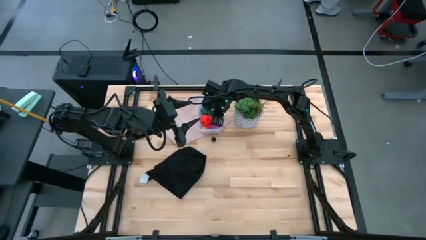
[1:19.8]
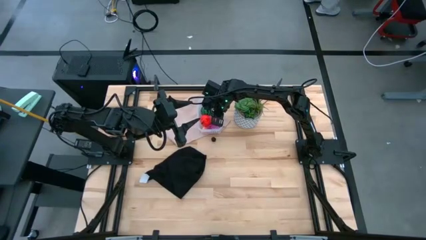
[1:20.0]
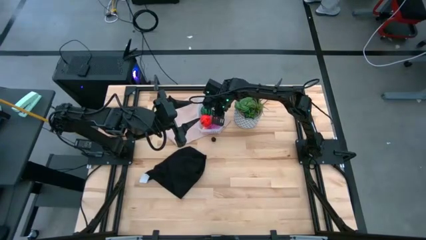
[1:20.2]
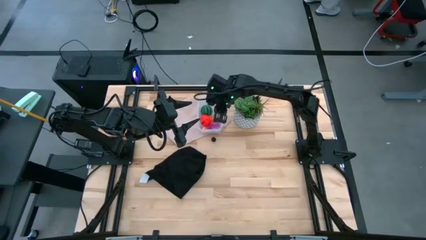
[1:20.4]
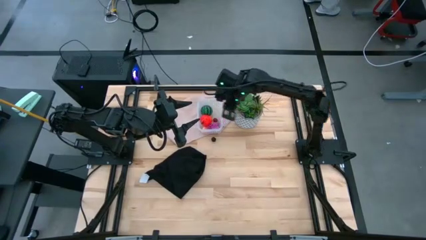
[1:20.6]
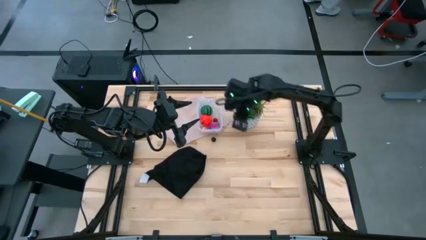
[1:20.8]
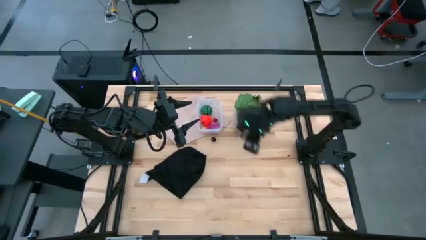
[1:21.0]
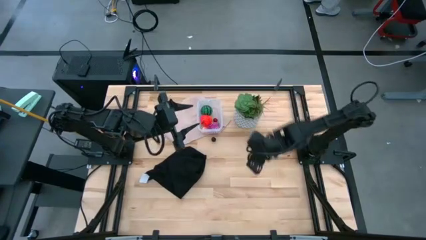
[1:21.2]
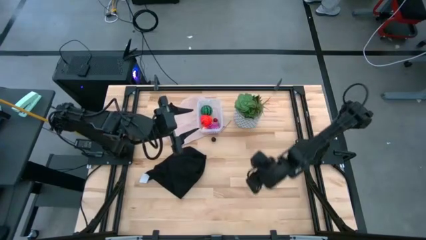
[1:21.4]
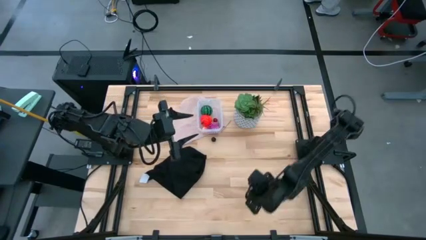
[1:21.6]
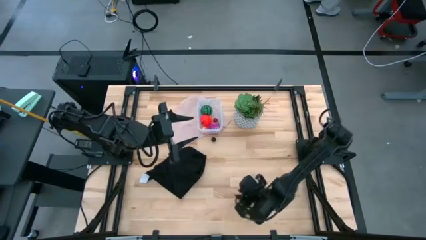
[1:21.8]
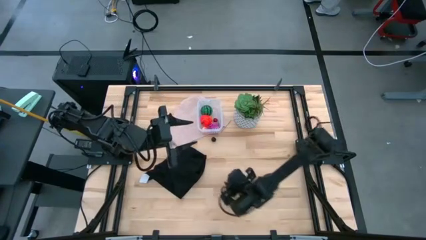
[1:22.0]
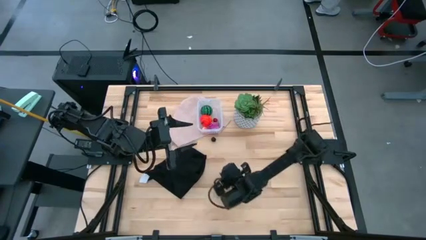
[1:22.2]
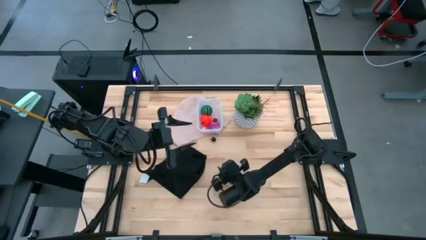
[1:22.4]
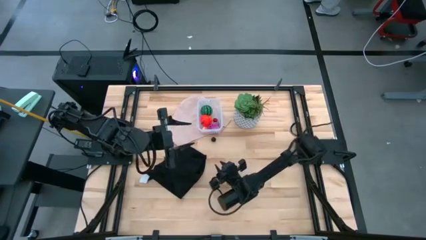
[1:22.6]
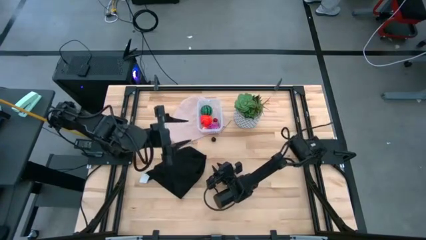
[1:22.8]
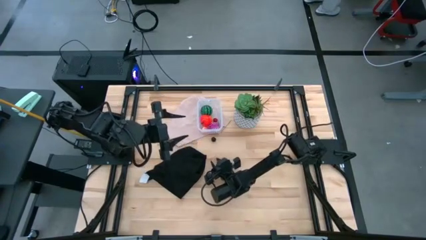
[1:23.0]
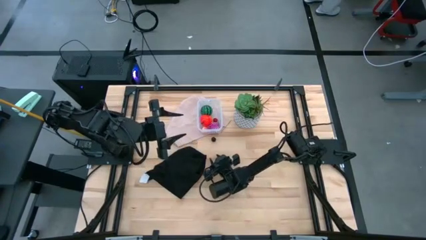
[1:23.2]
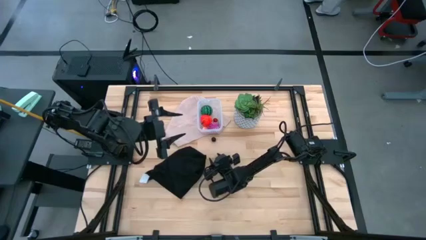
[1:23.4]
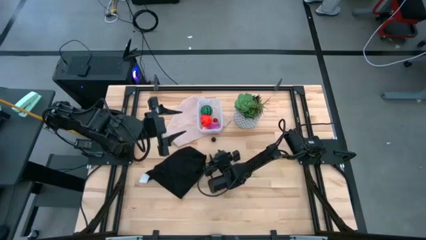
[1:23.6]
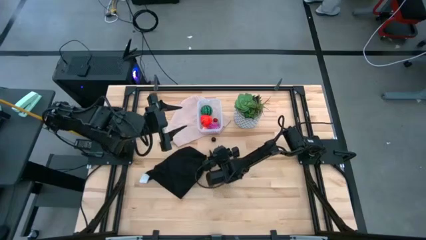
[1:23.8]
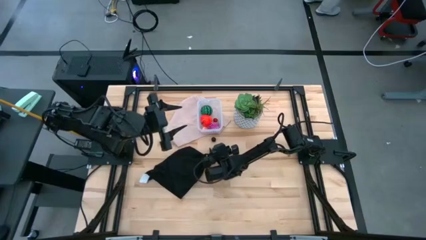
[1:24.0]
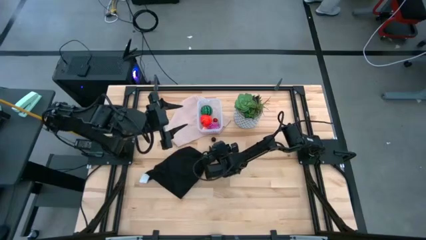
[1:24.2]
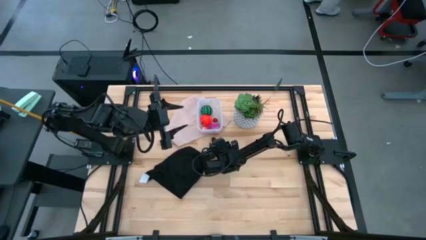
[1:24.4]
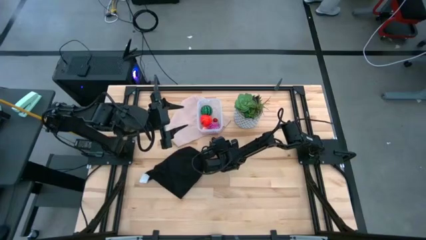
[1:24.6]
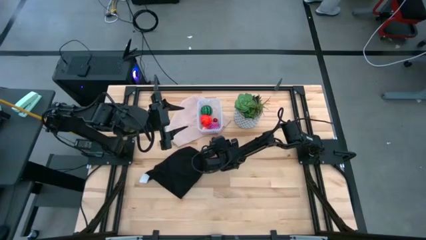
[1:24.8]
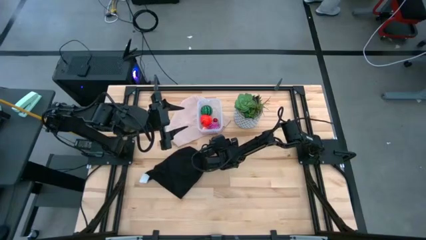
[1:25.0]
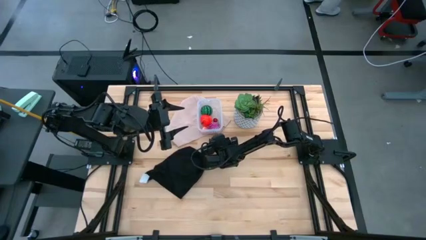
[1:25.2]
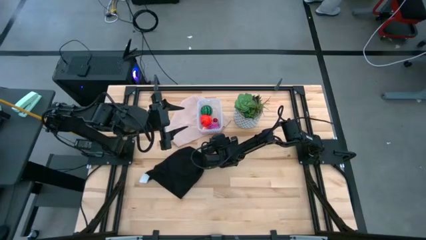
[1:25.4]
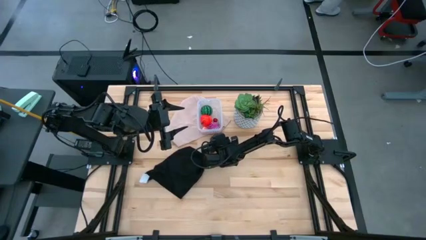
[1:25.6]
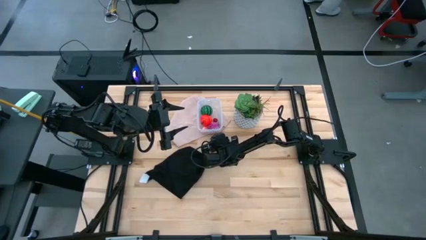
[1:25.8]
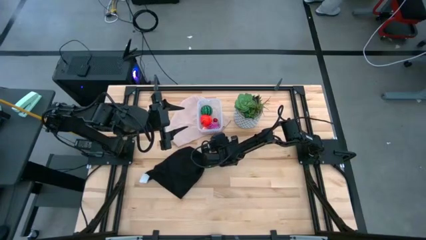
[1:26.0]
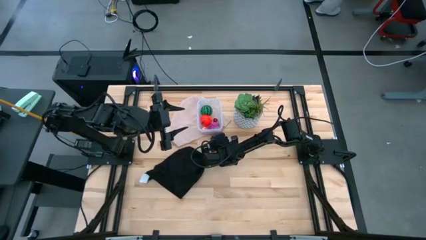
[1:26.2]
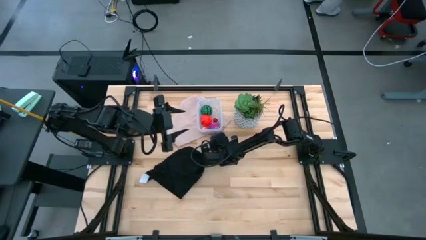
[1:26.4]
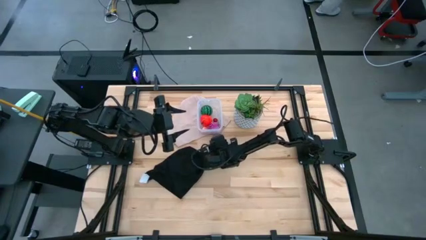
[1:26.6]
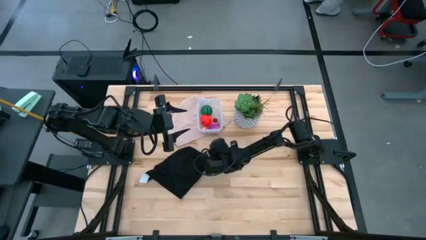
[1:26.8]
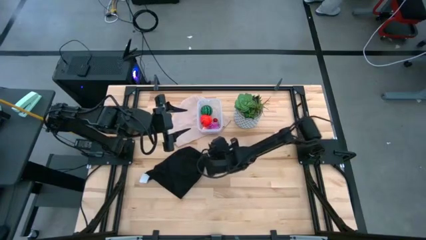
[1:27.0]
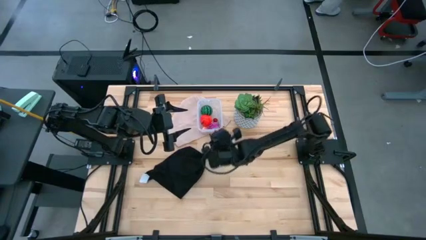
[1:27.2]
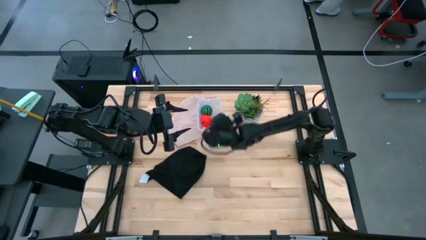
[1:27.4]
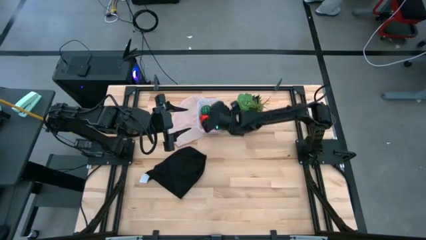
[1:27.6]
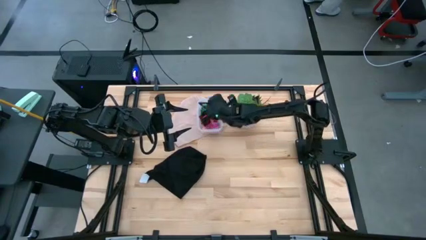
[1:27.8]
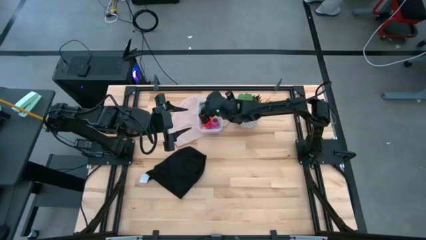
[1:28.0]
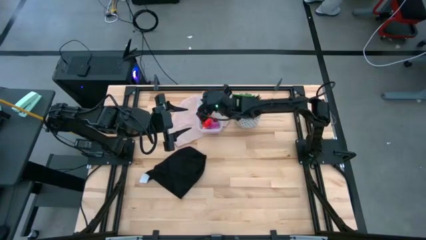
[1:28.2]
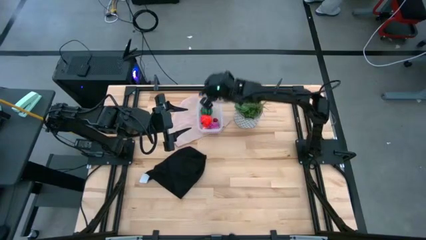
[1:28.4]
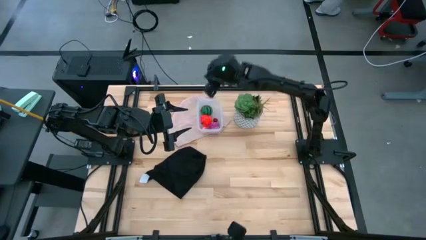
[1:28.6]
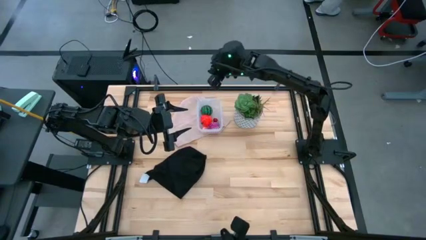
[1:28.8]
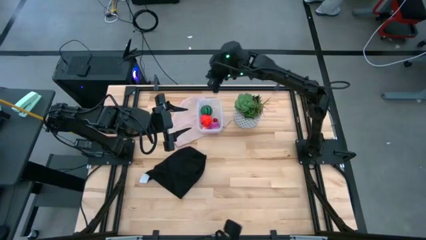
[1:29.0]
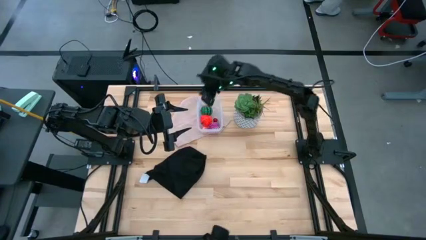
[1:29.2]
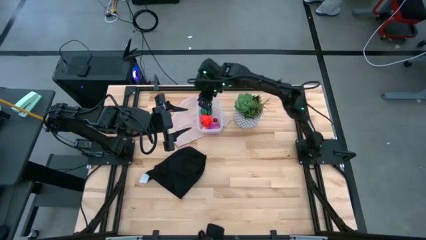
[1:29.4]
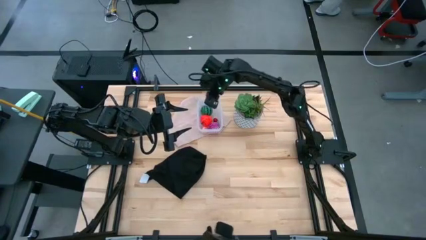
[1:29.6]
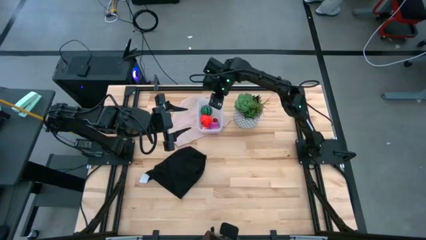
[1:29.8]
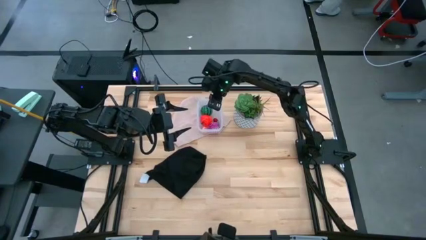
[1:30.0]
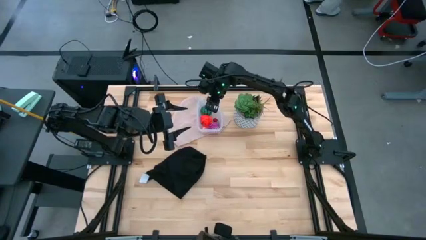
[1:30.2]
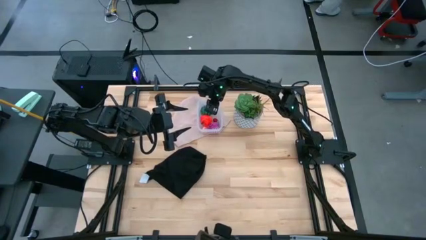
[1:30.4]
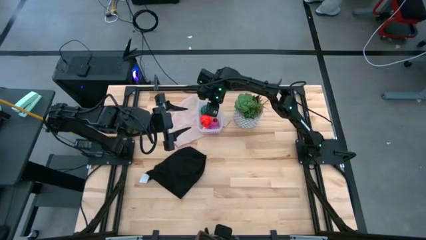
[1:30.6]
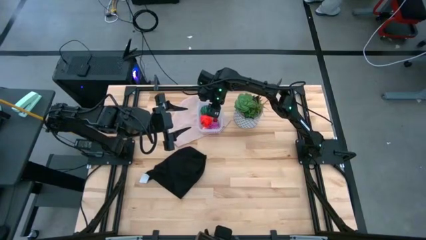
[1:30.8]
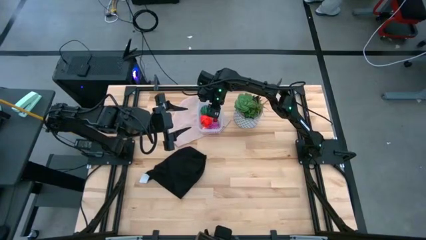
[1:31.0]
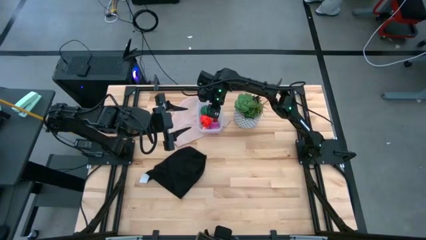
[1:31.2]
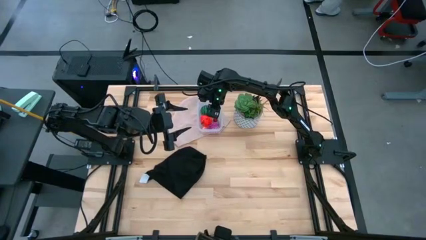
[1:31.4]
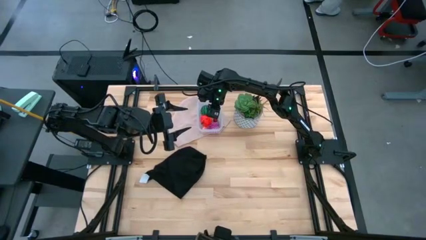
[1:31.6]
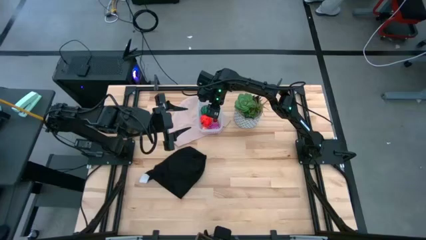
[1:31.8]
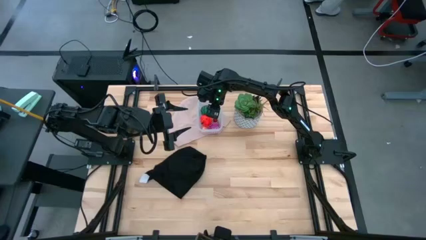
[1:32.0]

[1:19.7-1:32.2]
Task: Pick and placing Produce into tupperware
Put the plum into the transparent bin

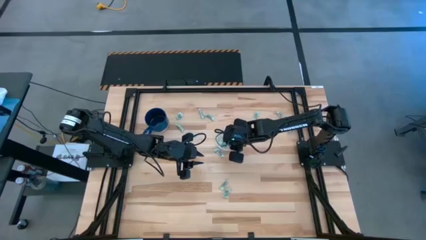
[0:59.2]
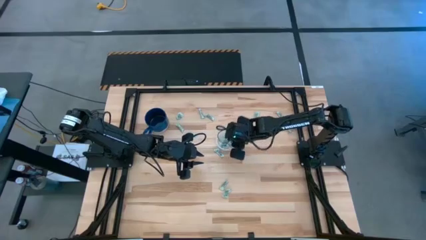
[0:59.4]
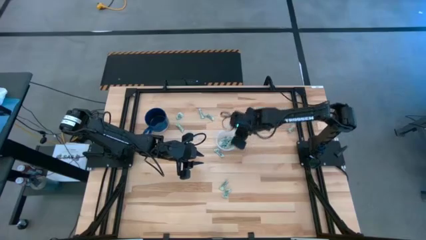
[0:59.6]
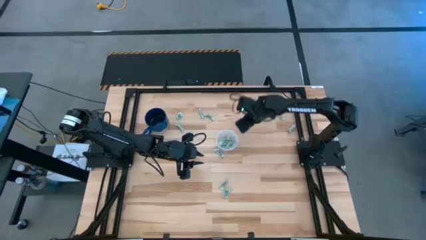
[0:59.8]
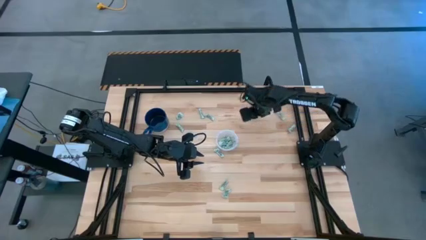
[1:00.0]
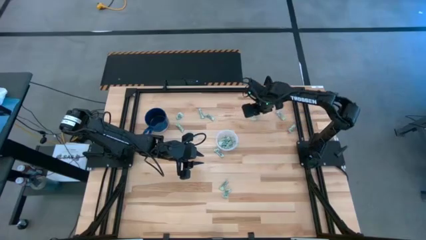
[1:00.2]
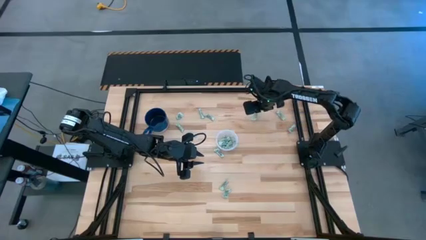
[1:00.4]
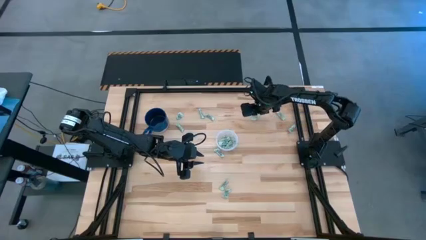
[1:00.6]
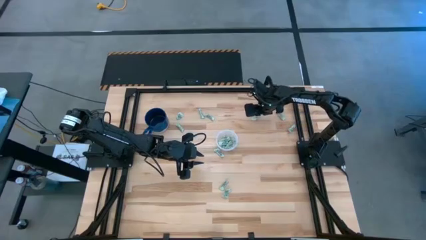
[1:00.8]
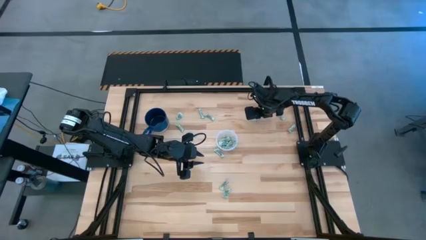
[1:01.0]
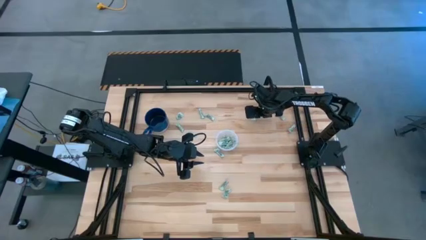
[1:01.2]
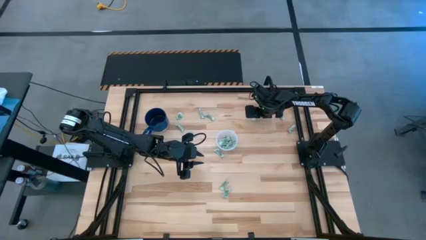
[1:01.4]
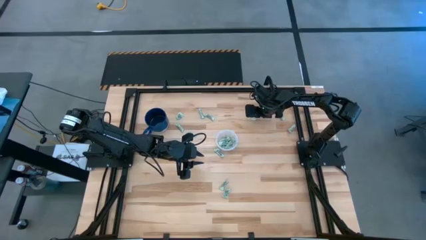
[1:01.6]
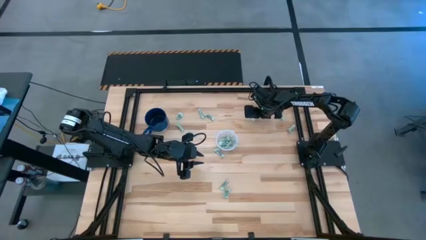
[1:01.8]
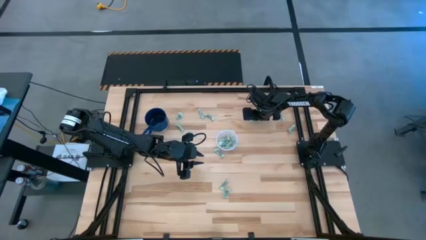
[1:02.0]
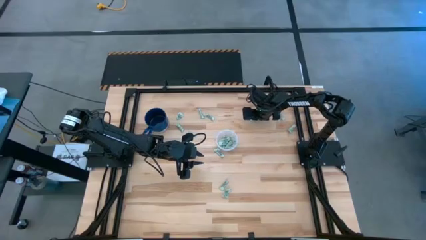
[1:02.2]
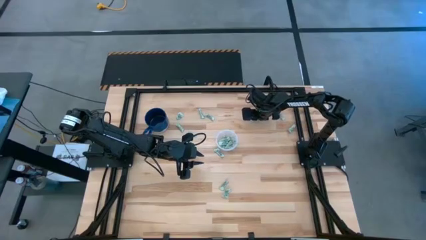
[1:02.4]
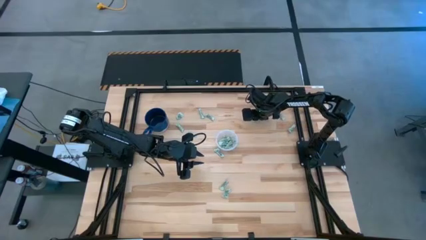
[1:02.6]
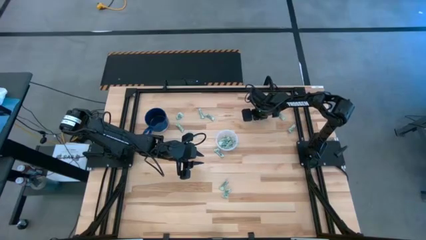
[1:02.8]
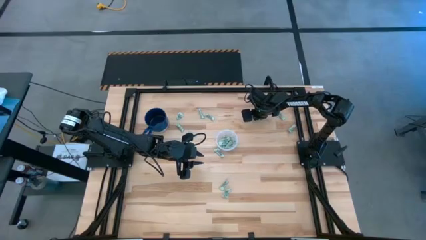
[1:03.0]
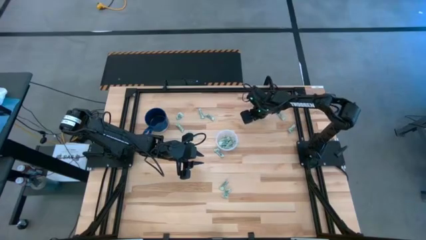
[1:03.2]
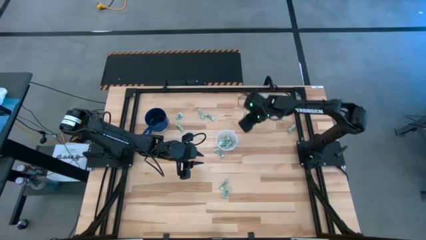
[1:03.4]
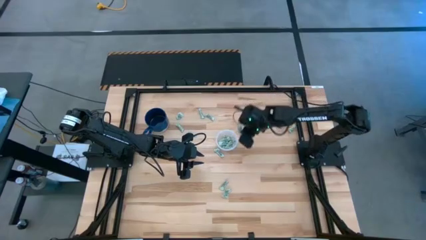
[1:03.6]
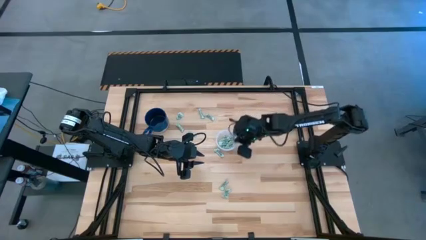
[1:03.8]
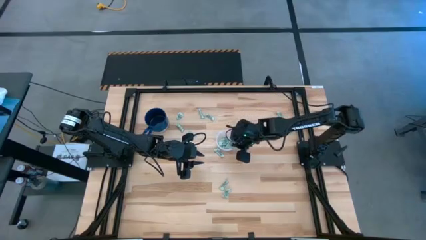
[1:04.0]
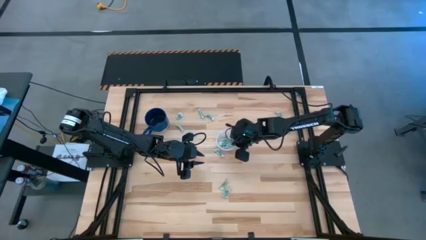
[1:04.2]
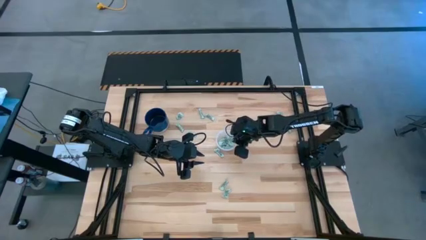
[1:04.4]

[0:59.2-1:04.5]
Task: Pick and place items into bin
Put the gray stevia packet into the transparent bin
